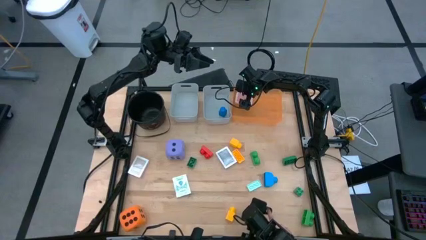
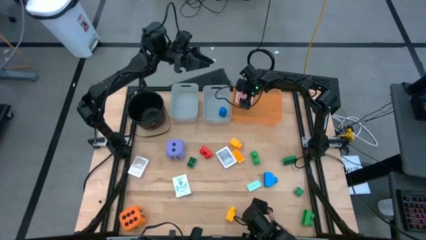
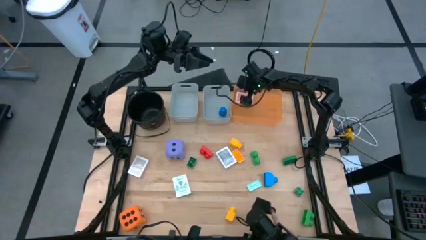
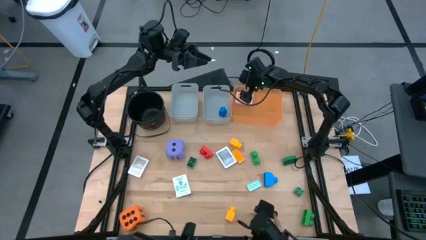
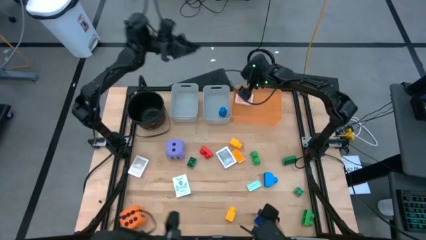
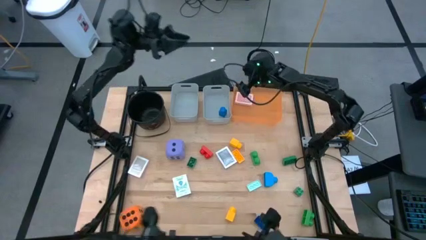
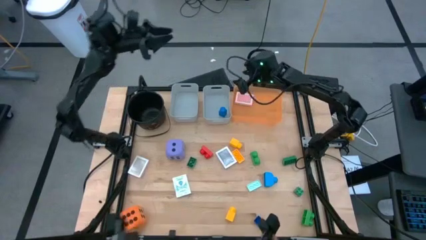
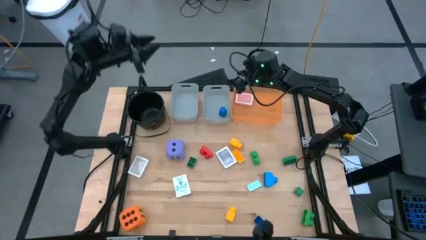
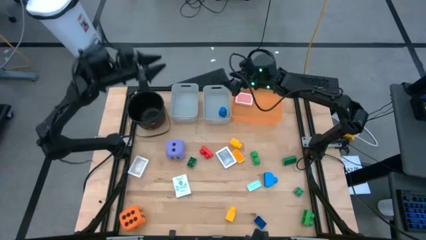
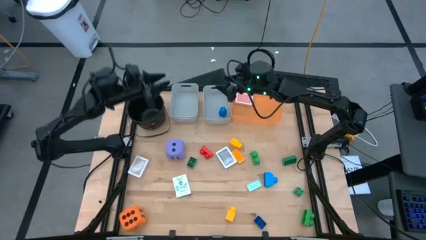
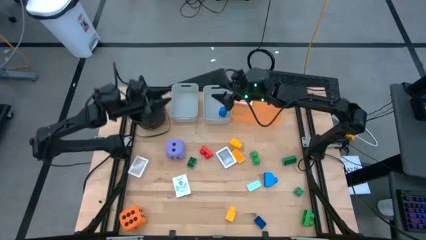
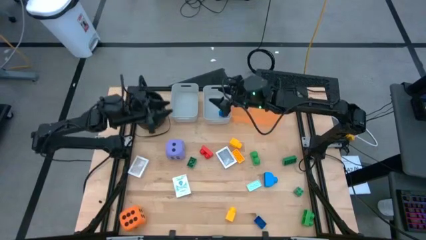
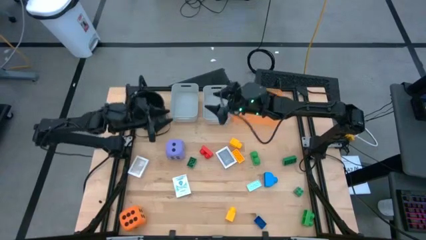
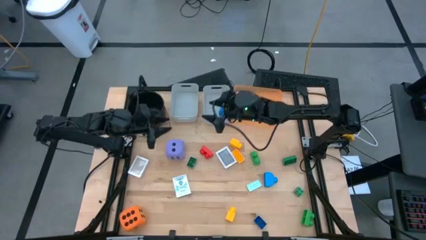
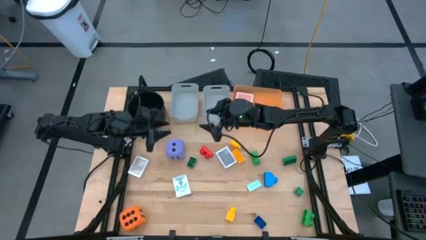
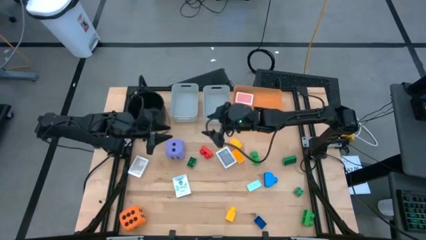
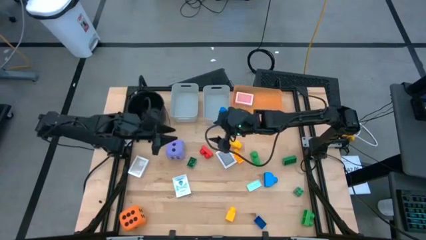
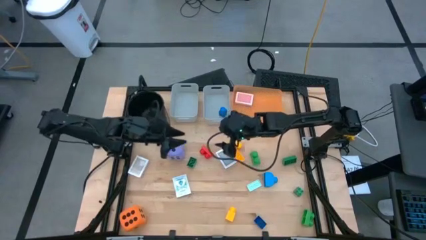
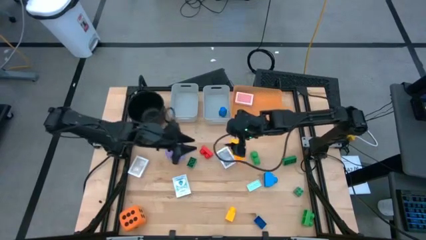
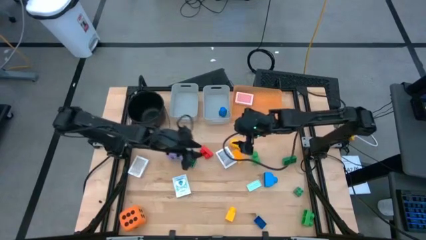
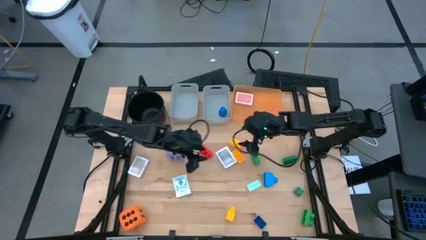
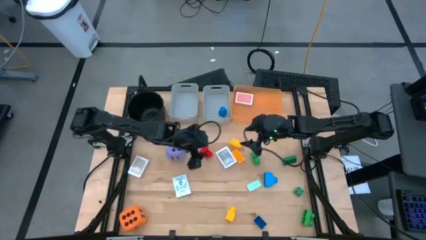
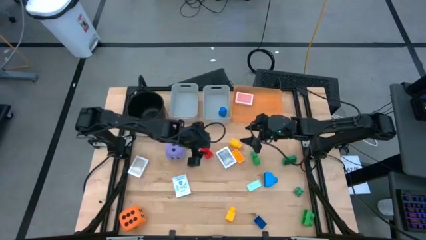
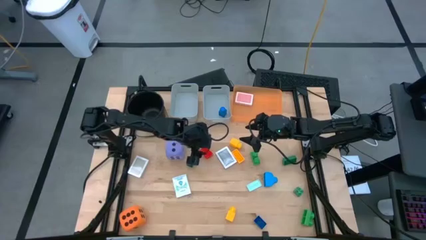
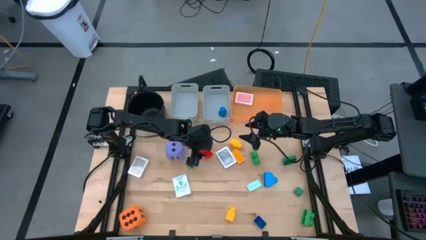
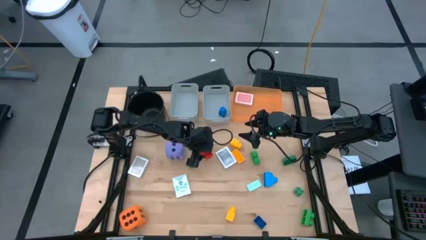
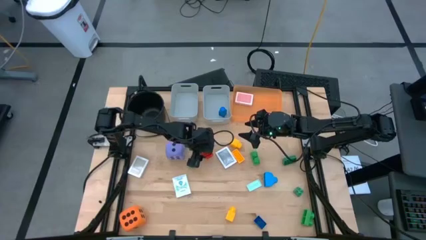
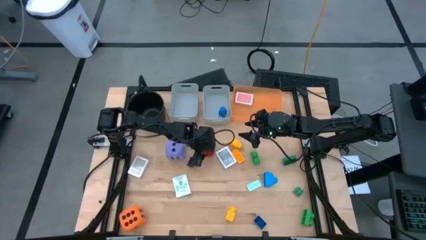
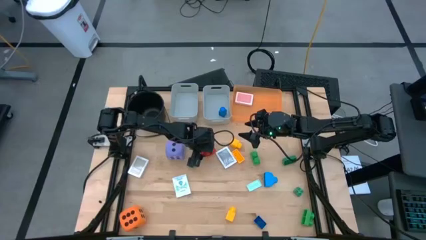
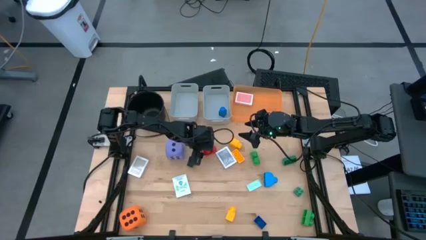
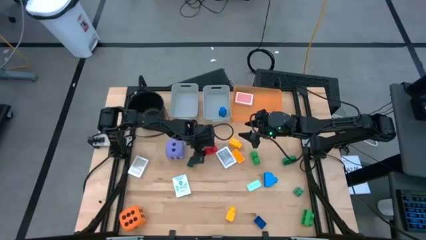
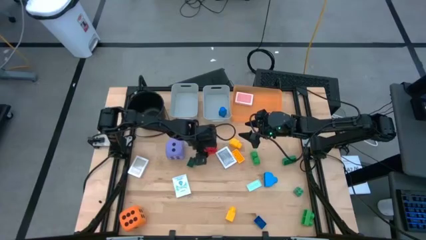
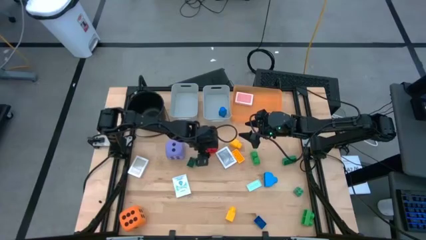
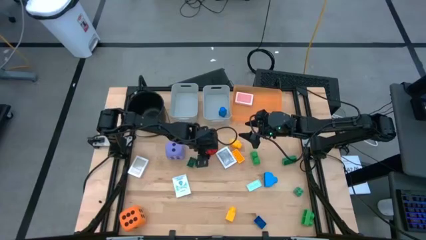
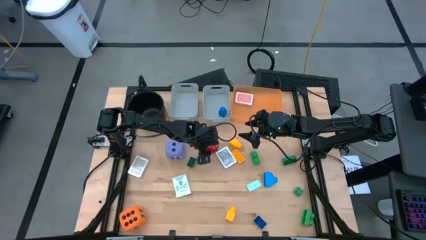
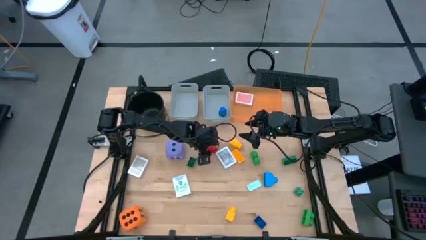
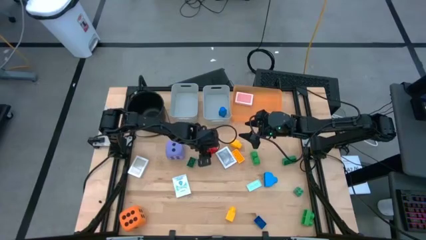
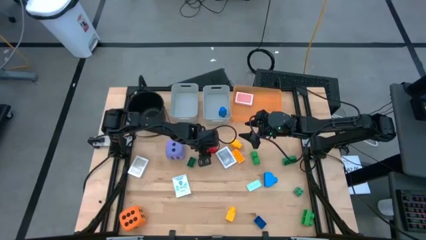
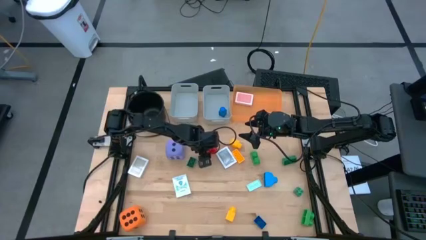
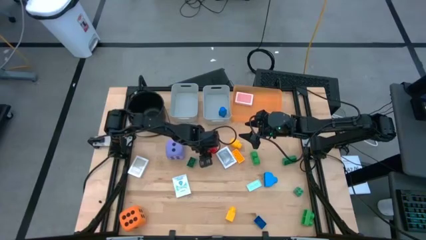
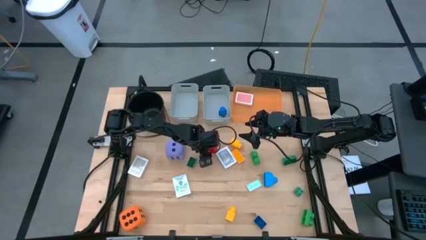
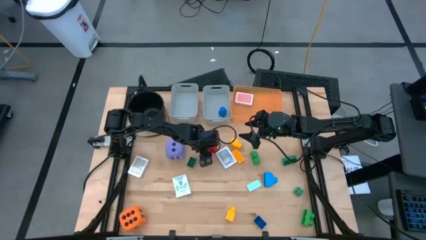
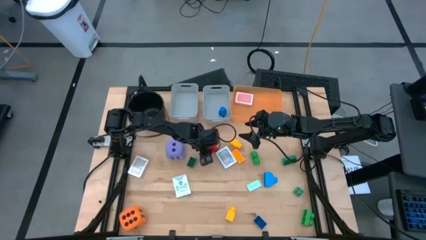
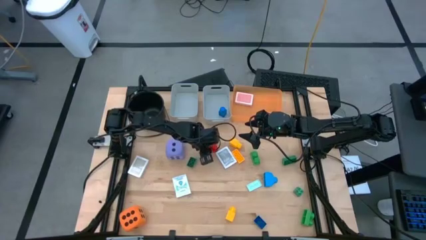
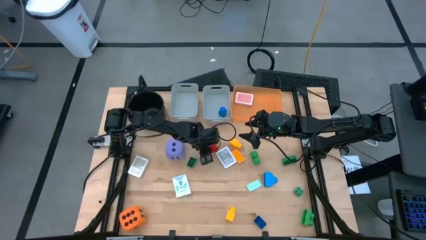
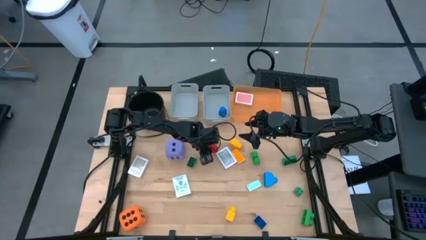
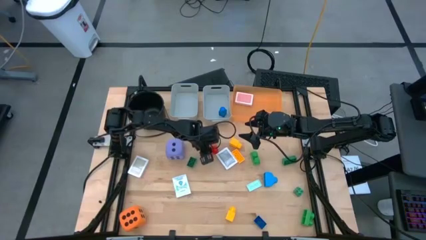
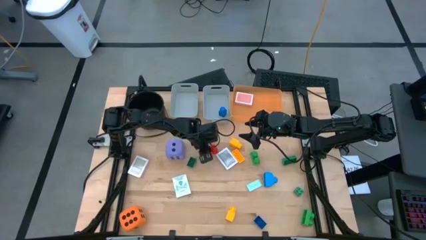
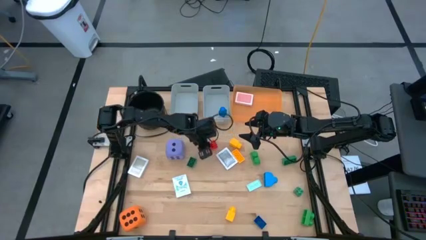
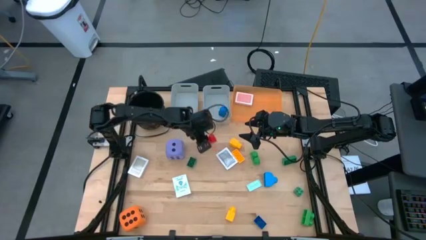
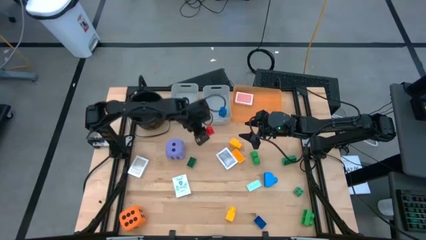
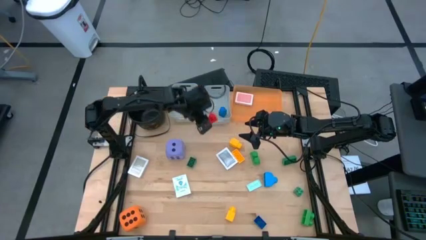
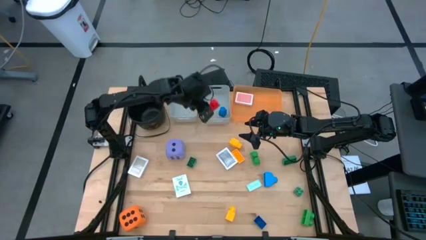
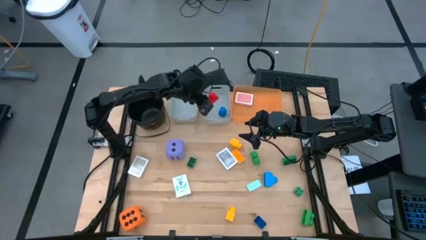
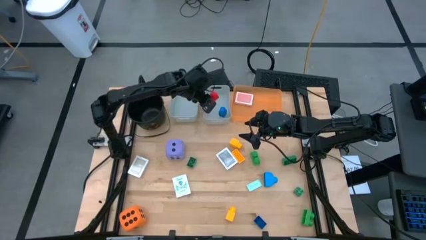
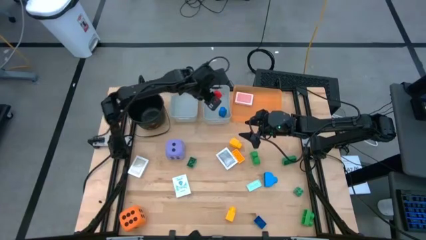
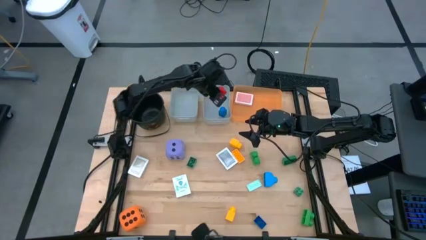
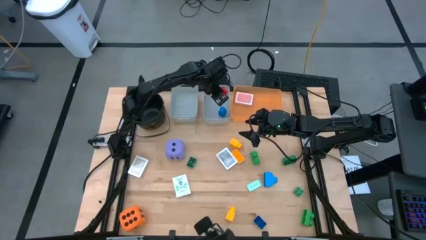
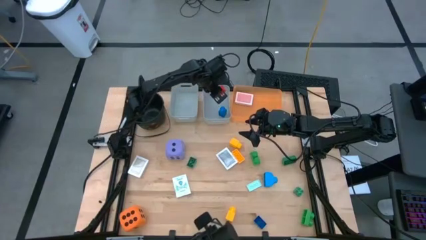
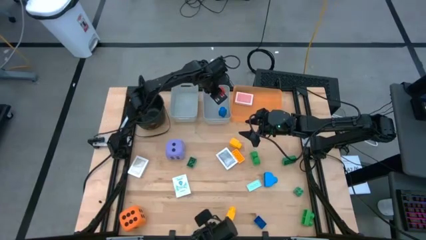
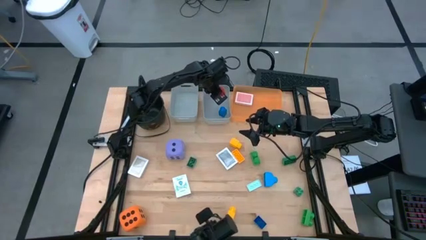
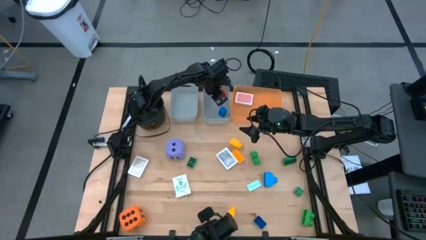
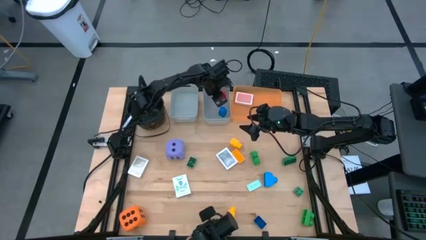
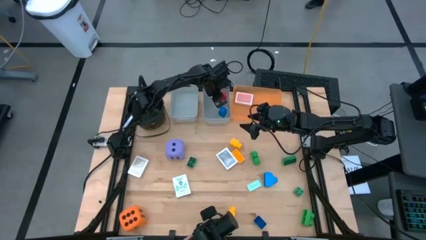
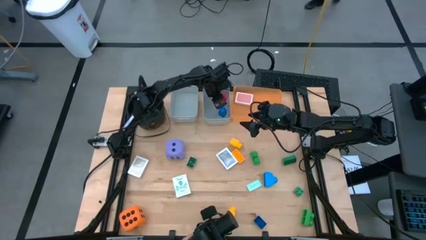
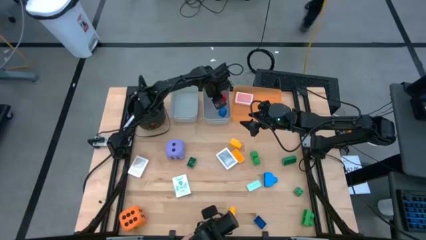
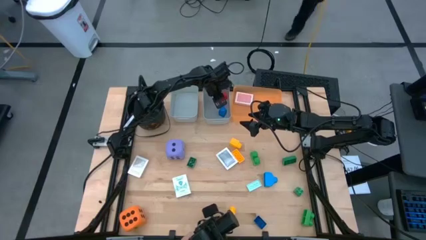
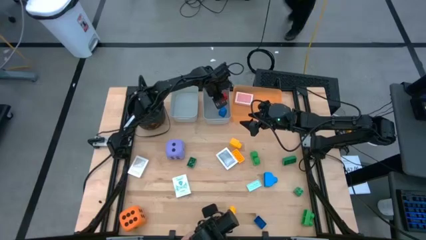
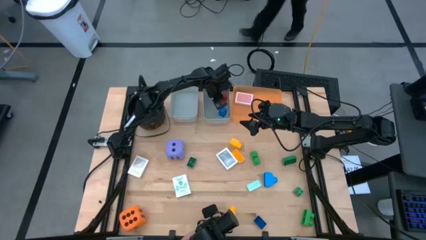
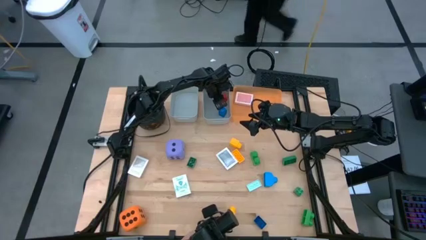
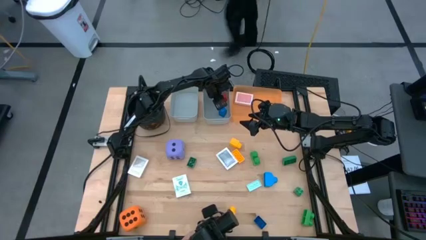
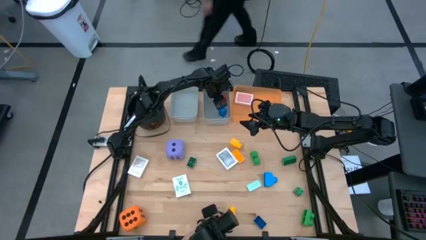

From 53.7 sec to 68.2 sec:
Task: Pick & Place Toys
Put the red gamepiece into the right gray bin
